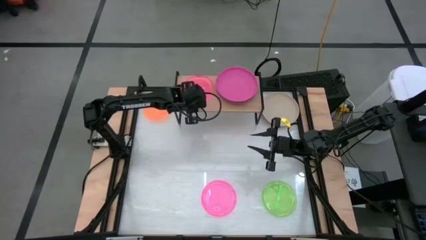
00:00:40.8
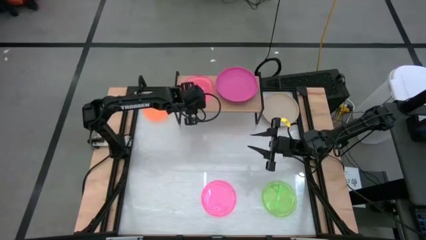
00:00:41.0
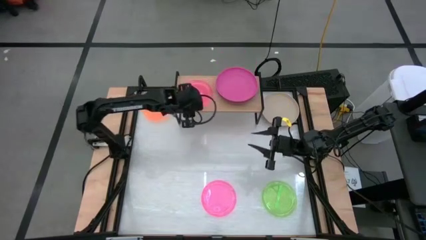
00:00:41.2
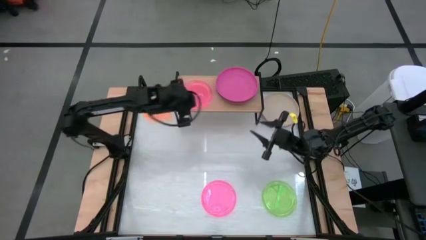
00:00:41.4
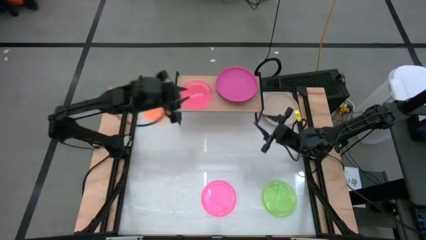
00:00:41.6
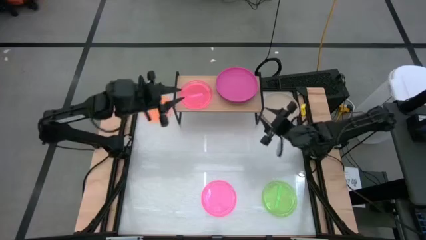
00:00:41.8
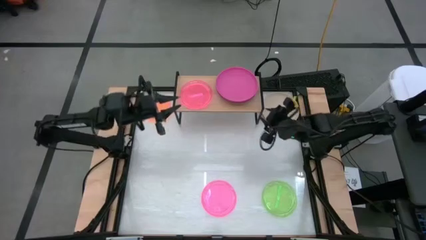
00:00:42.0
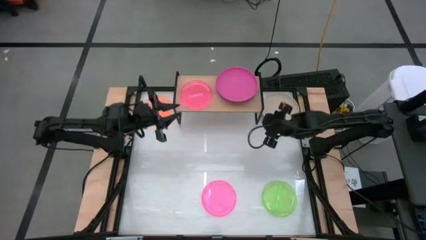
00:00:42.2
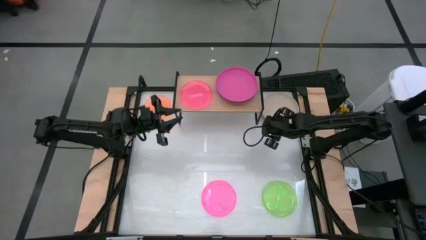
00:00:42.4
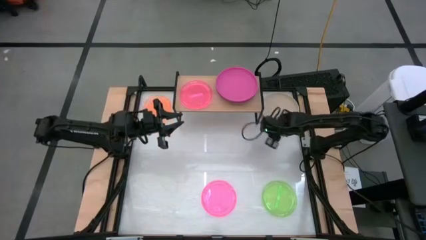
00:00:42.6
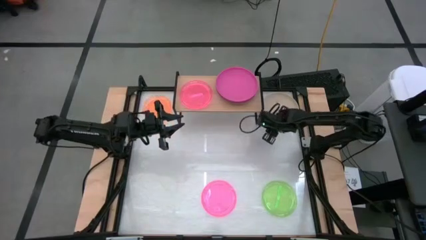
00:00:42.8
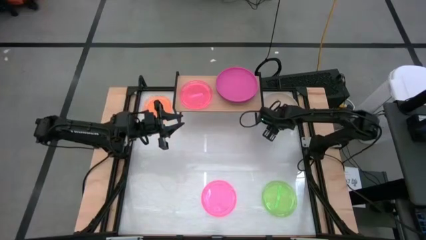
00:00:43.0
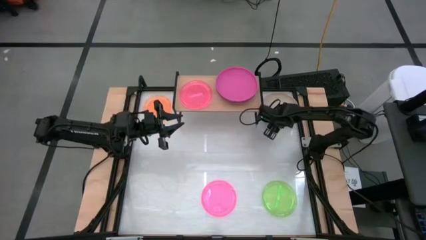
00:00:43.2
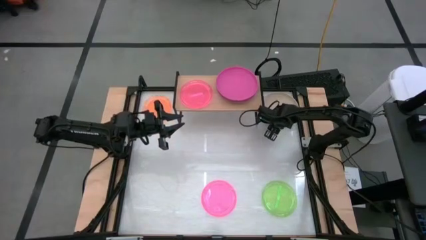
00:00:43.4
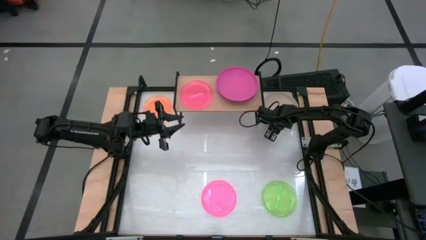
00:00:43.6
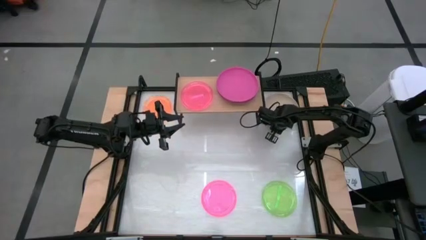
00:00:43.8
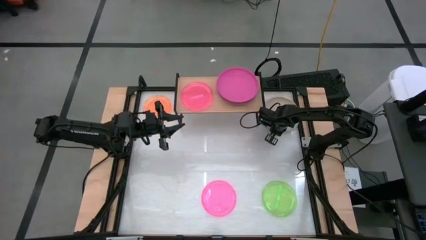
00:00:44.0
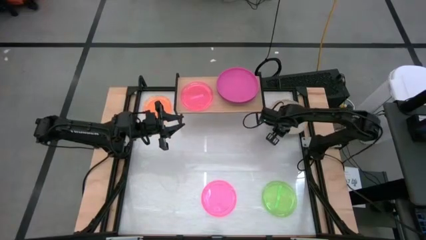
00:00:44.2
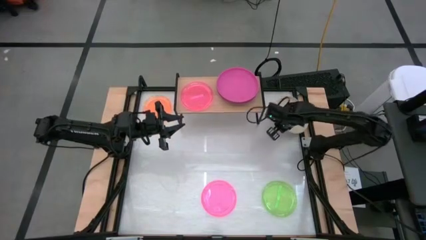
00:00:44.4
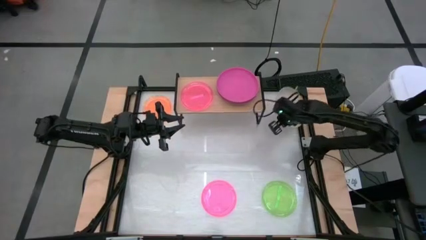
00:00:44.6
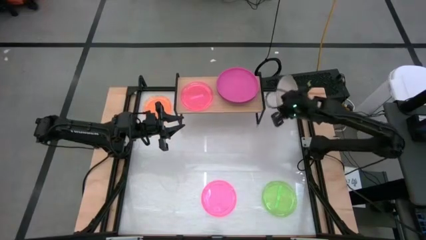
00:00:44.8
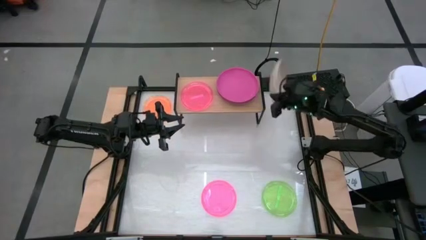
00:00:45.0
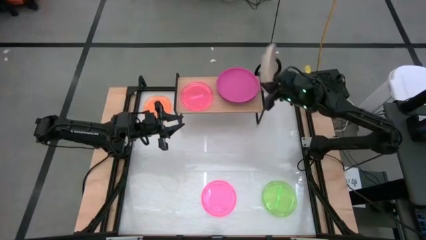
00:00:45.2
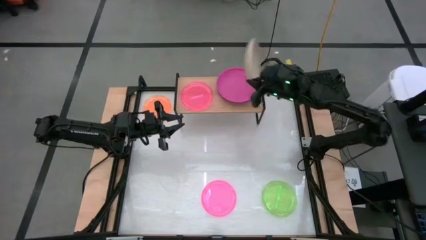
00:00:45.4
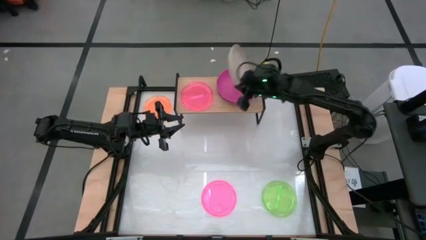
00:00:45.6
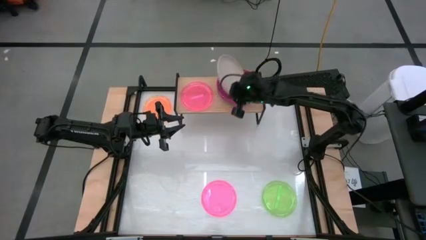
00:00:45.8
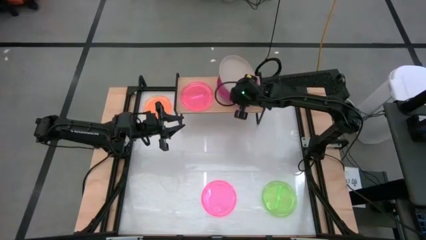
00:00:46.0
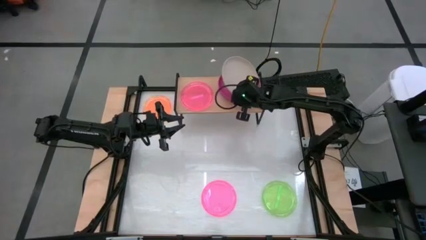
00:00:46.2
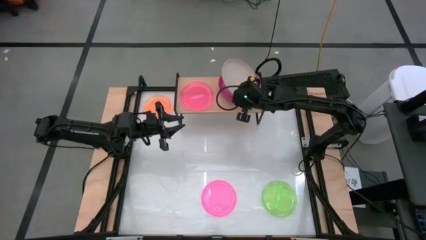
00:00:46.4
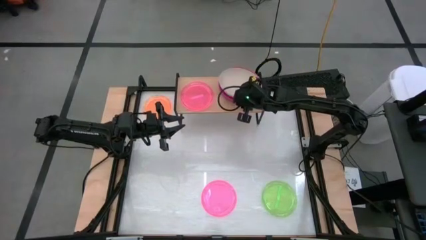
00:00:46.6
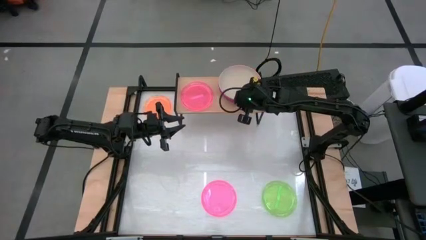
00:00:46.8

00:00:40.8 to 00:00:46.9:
Task: Place and stack plates onto a shelf
Stack the brown plate on top of the pink plate on the shelf

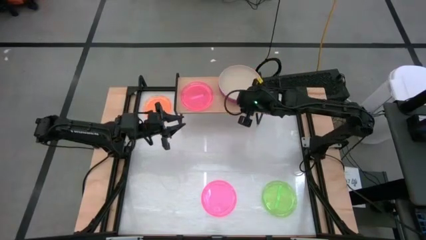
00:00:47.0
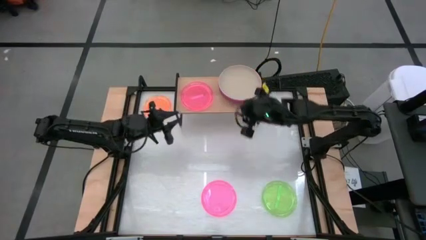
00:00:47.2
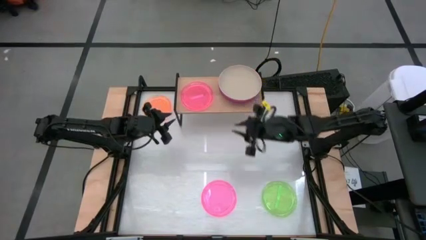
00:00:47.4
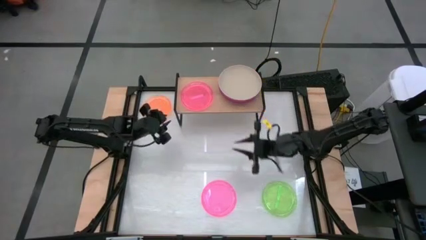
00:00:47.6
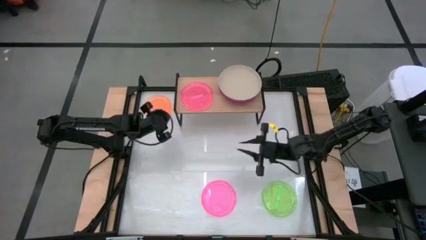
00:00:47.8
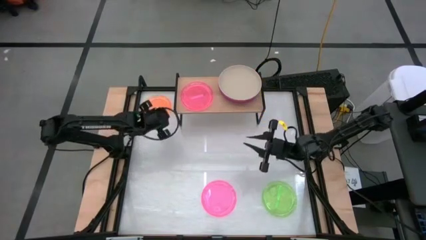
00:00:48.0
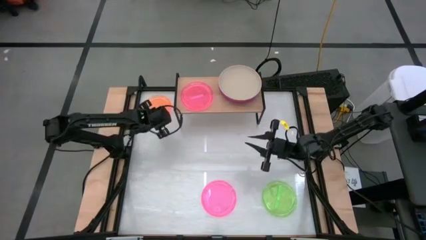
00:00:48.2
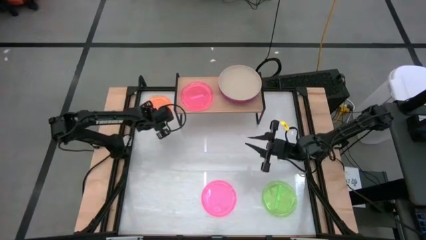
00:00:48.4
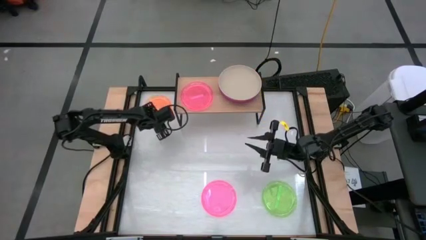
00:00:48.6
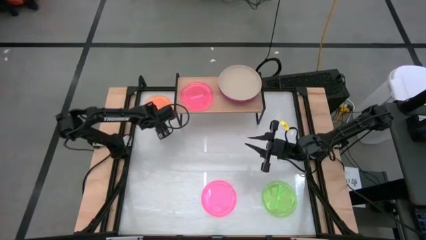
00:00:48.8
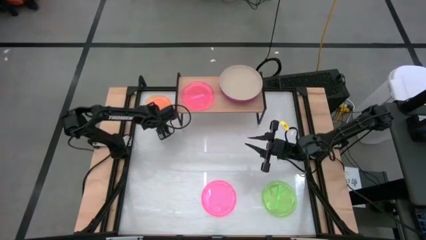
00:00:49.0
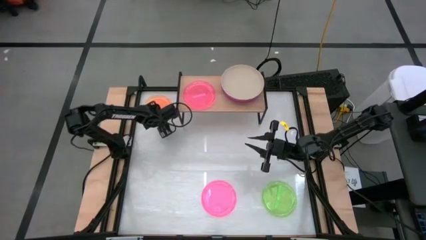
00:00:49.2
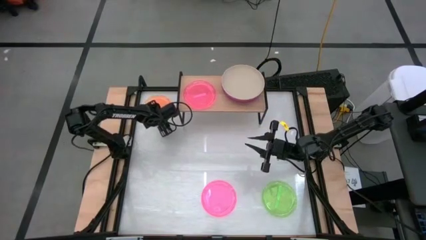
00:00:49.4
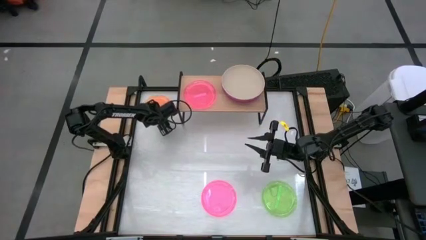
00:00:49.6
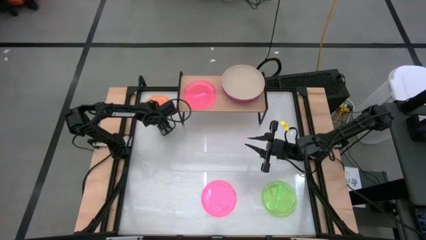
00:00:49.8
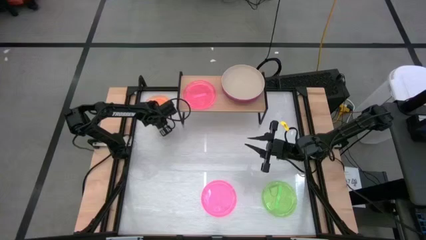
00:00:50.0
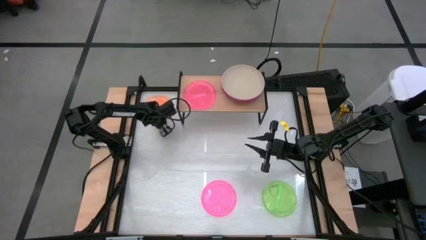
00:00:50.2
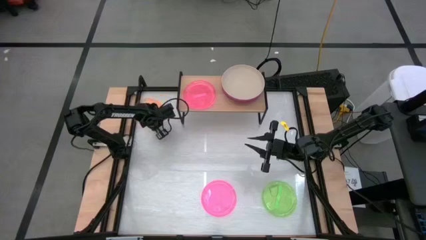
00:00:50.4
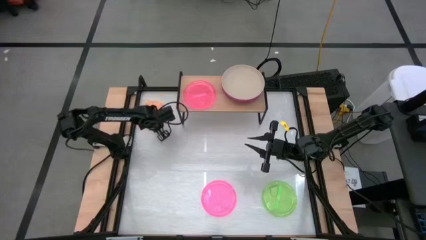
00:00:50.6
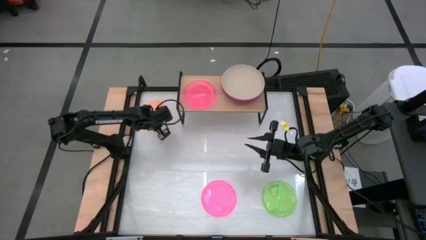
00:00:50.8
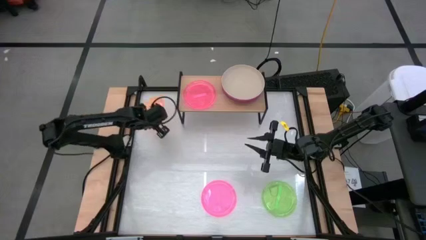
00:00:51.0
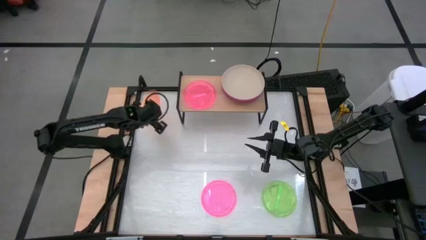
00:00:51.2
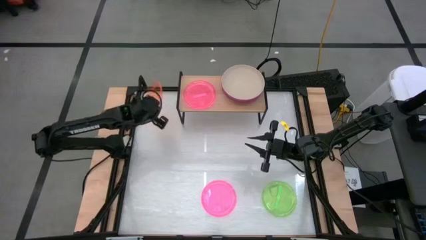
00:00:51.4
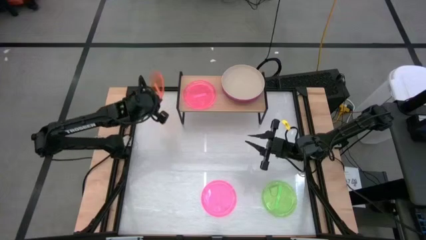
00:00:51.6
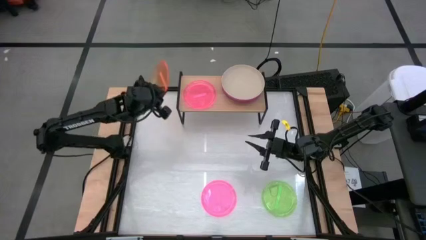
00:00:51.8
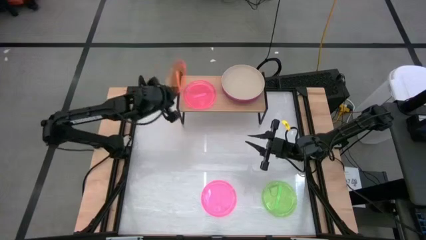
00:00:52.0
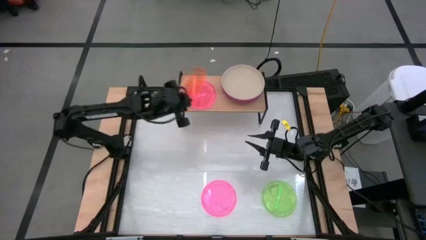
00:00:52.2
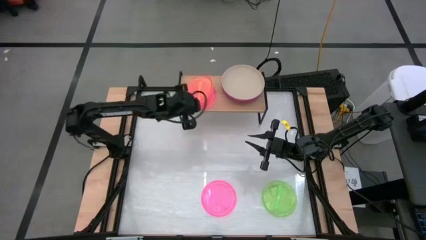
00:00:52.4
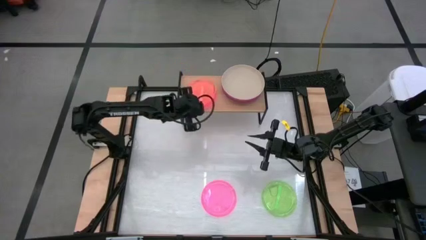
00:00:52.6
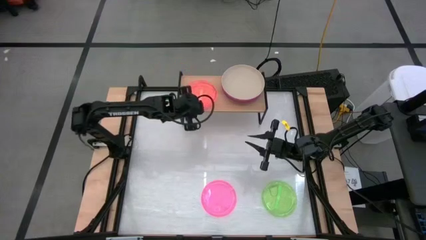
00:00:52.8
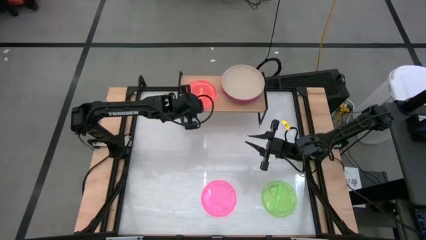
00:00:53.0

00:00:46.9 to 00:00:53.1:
Stack the orange plate on top of the pink plate on the shelf

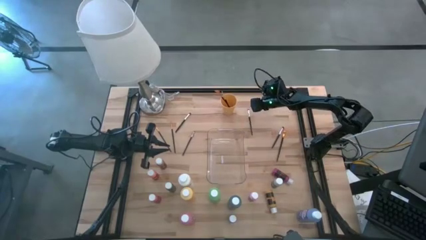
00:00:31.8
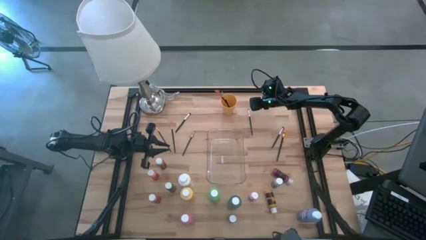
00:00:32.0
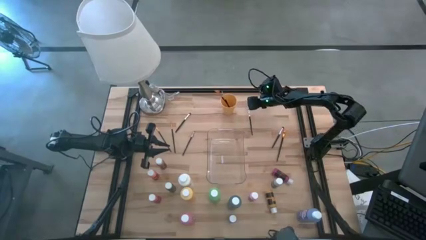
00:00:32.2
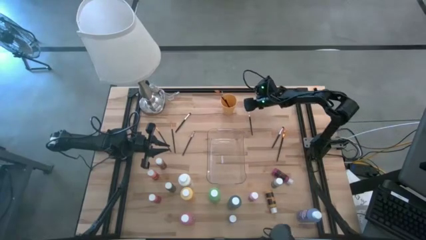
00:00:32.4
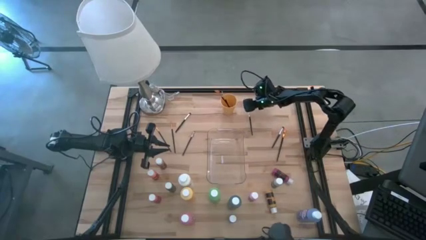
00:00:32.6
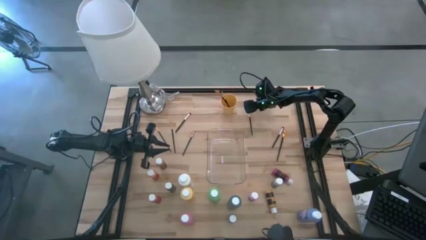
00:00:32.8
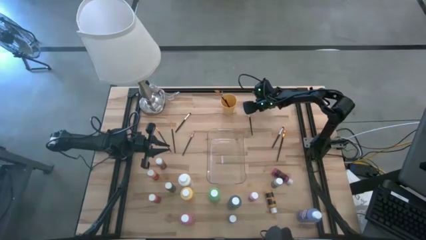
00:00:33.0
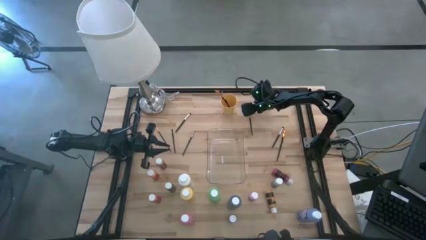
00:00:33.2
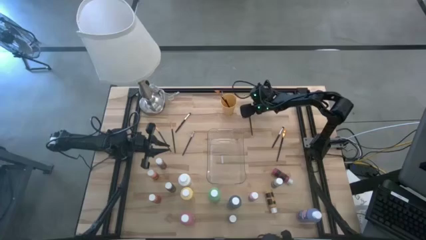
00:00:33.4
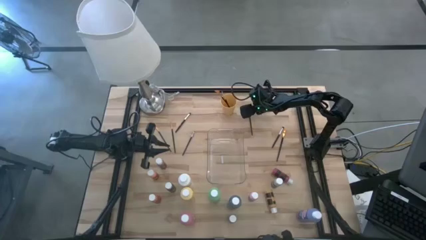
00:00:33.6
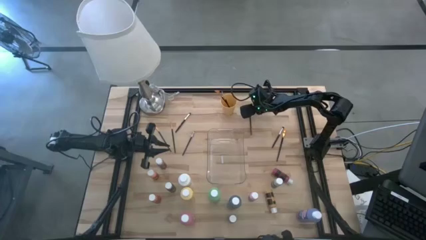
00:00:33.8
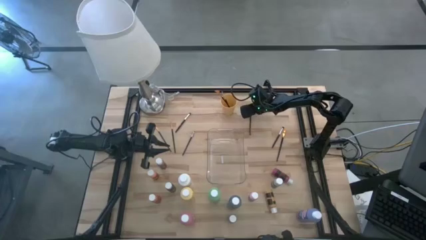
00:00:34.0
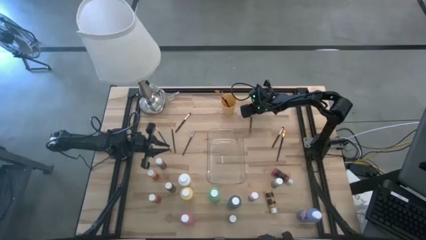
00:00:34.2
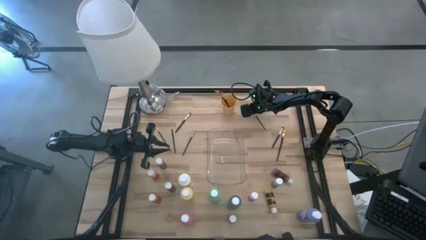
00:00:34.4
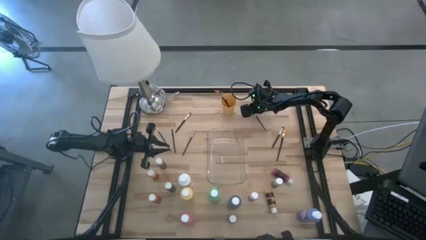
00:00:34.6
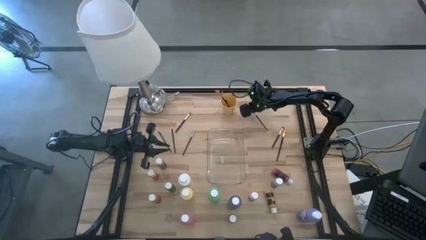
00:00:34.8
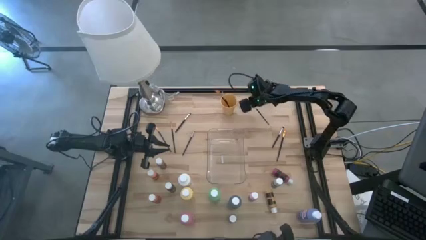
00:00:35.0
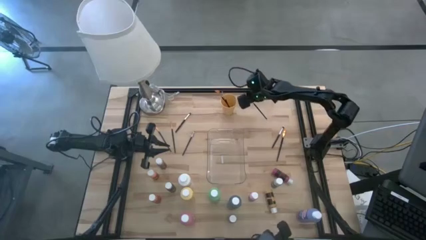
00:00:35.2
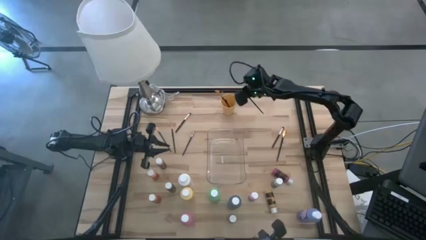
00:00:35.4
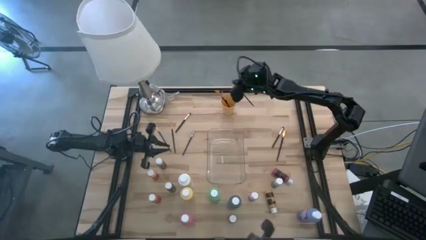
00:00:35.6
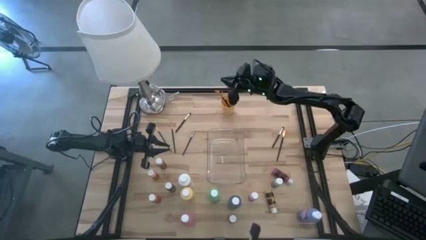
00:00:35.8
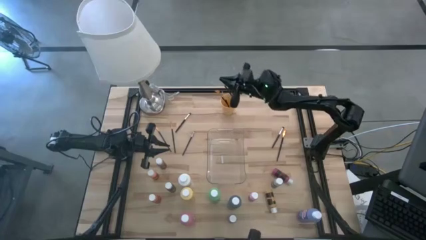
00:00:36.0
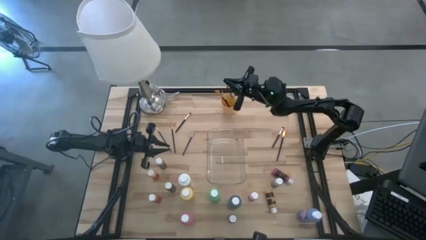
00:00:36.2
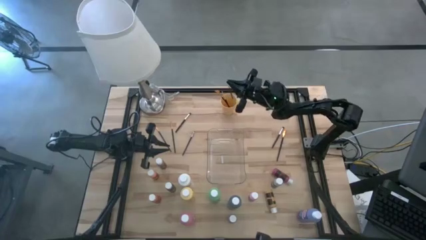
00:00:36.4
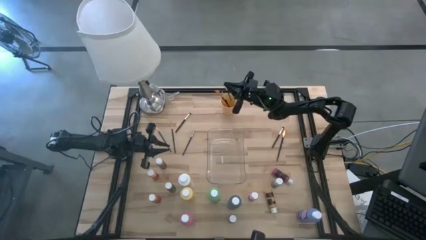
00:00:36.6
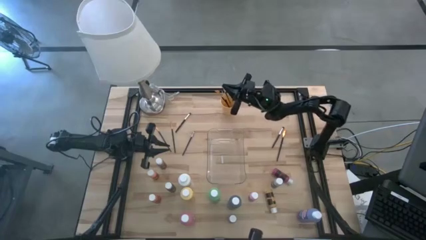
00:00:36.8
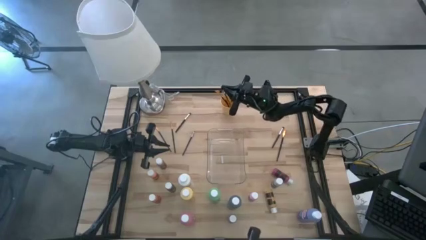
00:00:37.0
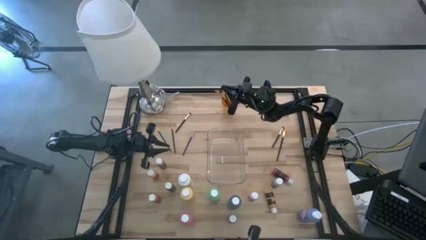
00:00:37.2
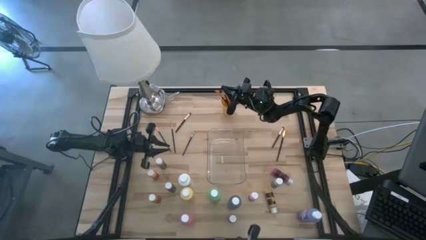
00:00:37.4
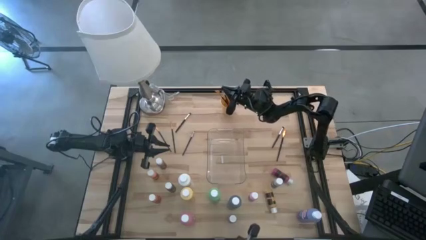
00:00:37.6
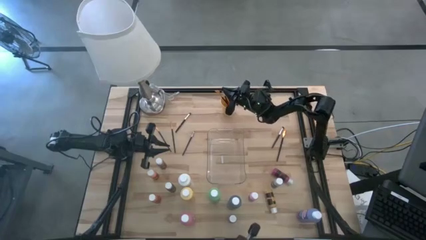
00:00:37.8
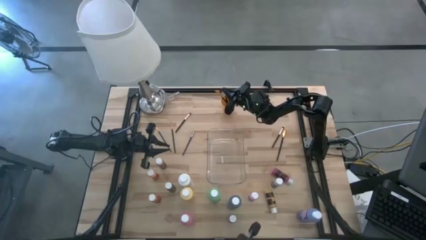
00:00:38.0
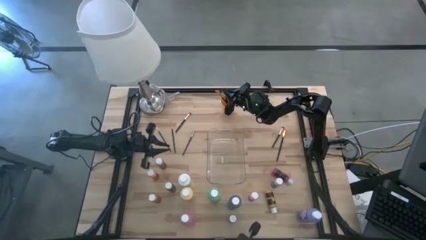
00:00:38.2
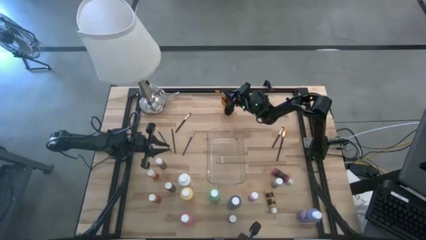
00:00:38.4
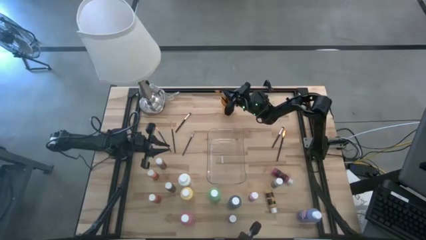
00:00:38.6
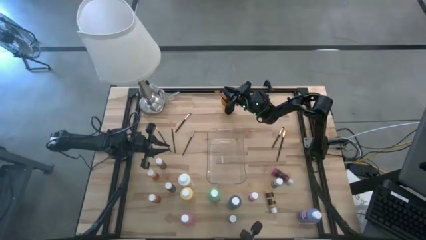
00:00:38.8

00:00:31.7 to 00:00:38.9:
Task: Pick & Place Paint Supplies
Put the silver paint brush into the yellow cup
